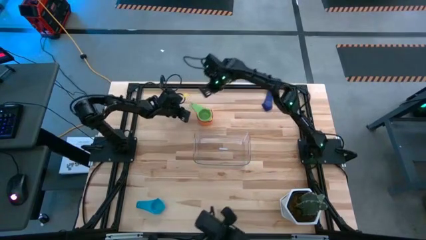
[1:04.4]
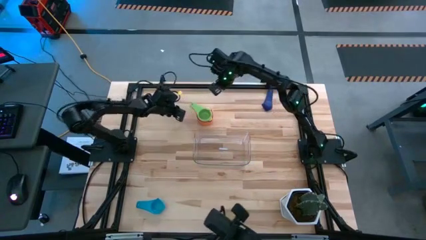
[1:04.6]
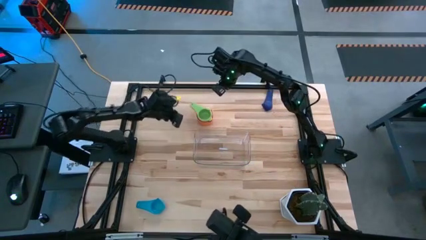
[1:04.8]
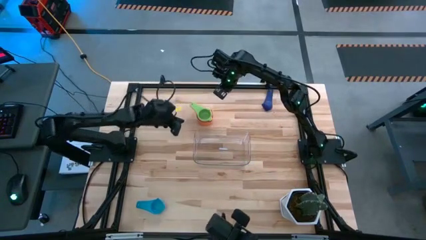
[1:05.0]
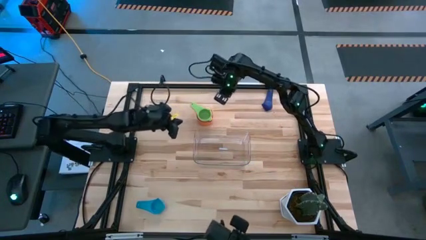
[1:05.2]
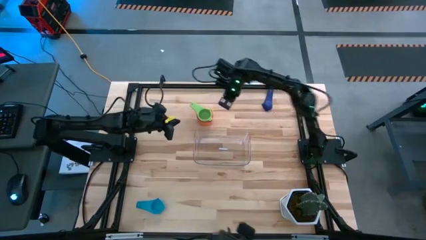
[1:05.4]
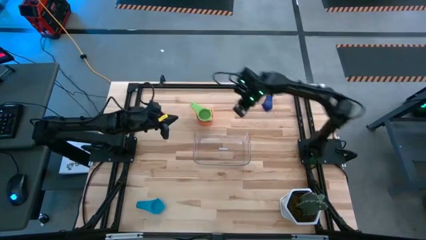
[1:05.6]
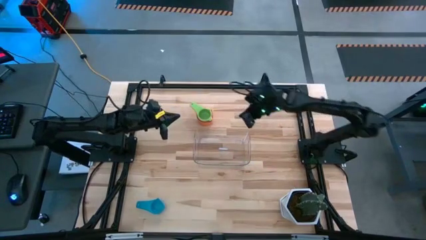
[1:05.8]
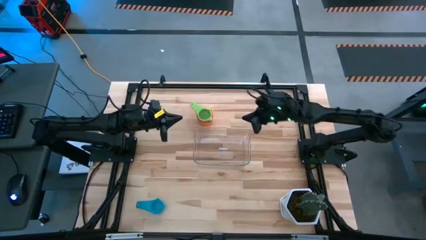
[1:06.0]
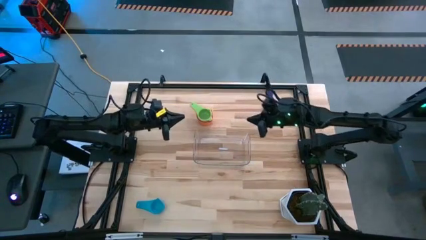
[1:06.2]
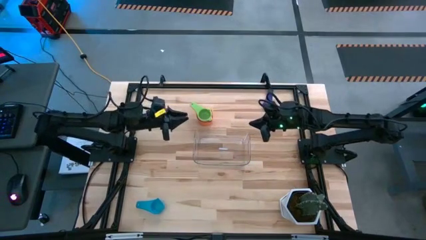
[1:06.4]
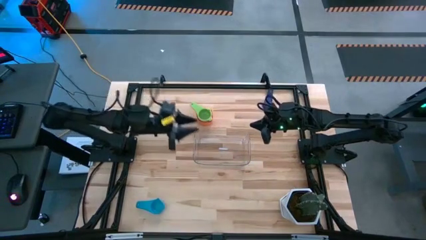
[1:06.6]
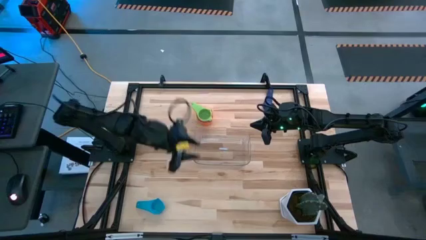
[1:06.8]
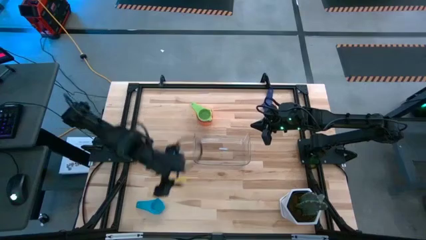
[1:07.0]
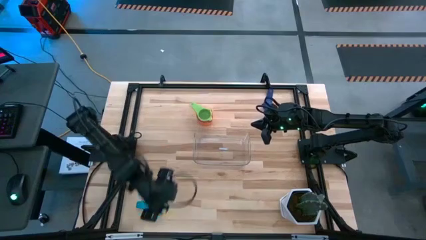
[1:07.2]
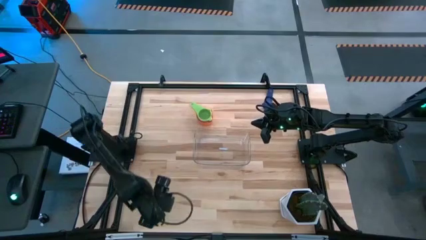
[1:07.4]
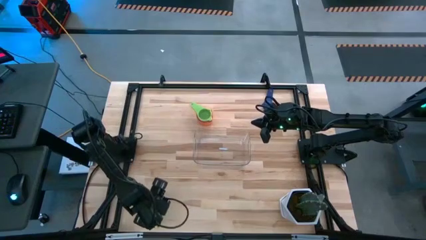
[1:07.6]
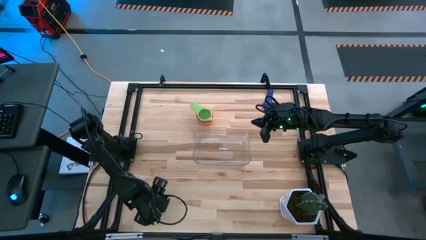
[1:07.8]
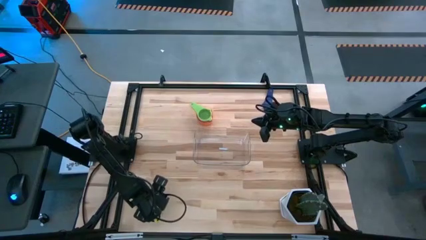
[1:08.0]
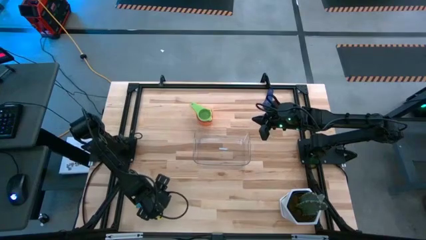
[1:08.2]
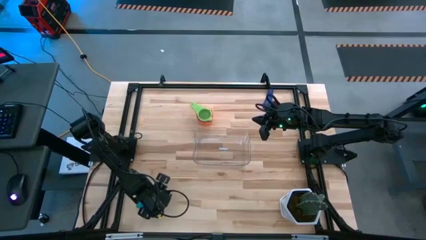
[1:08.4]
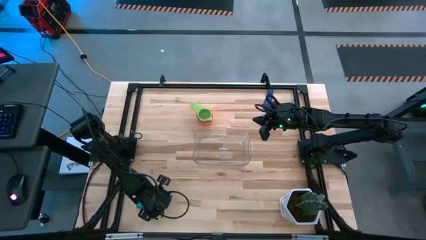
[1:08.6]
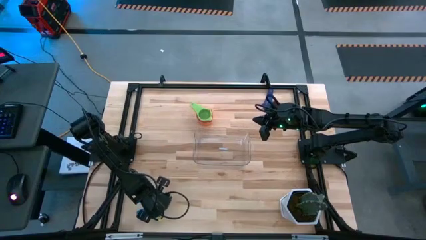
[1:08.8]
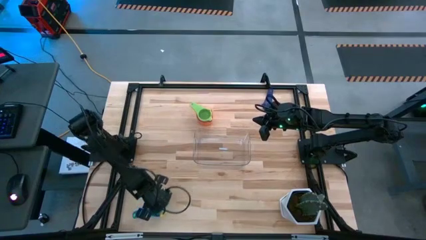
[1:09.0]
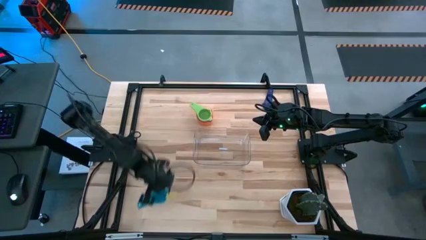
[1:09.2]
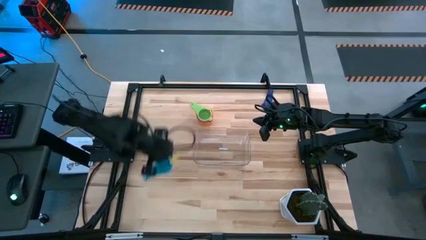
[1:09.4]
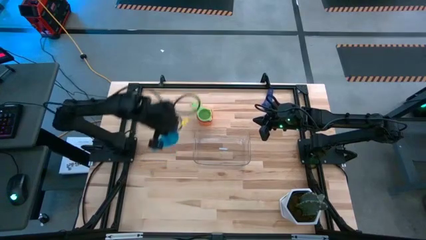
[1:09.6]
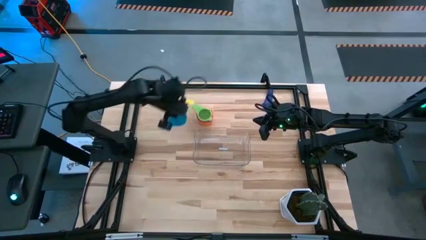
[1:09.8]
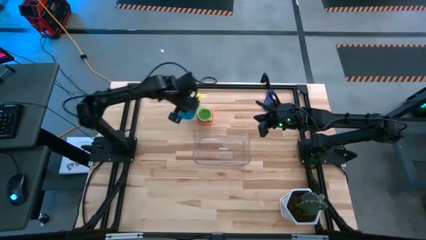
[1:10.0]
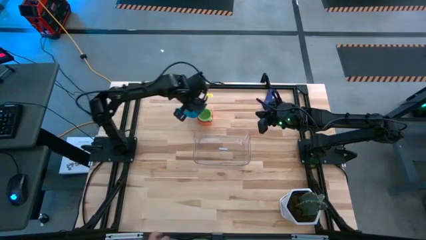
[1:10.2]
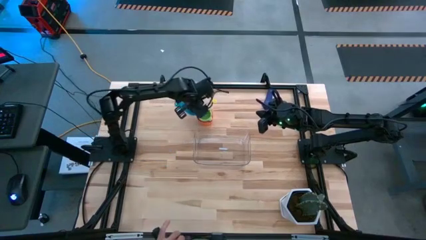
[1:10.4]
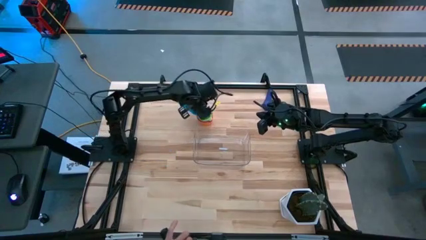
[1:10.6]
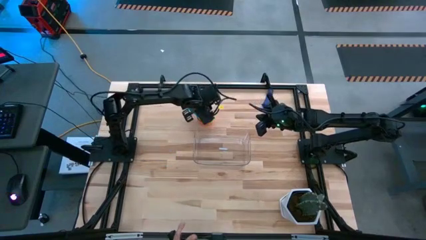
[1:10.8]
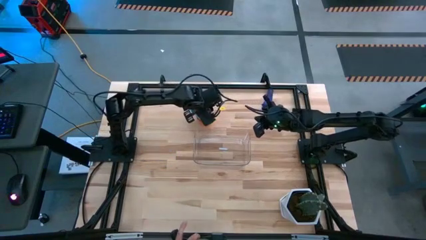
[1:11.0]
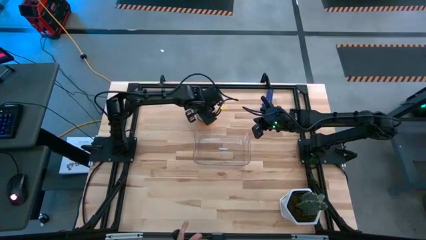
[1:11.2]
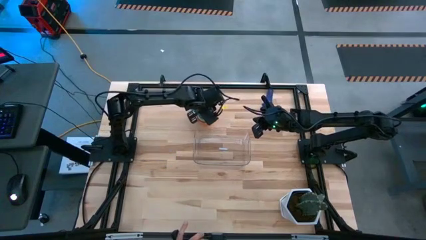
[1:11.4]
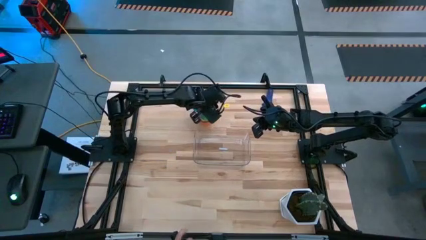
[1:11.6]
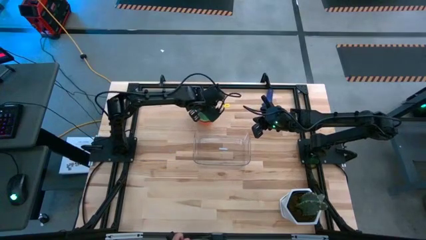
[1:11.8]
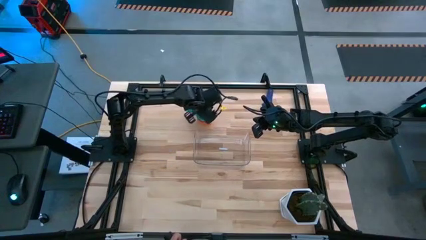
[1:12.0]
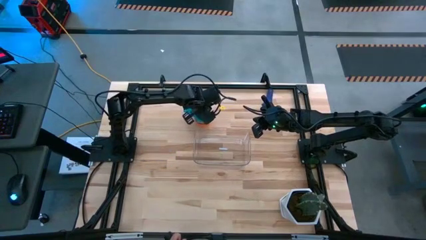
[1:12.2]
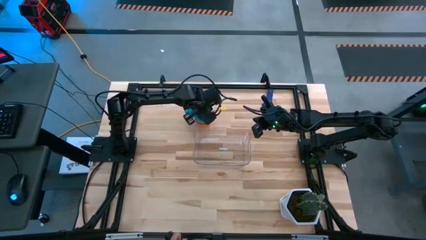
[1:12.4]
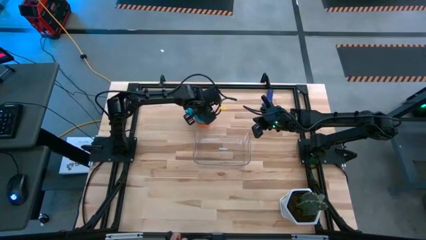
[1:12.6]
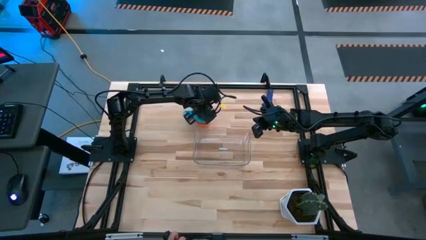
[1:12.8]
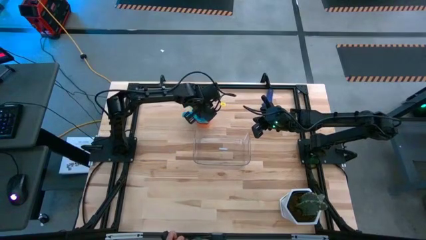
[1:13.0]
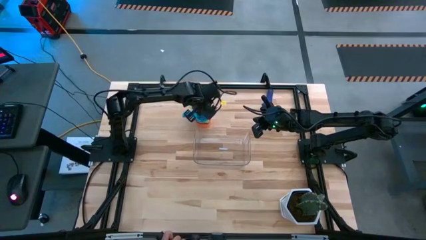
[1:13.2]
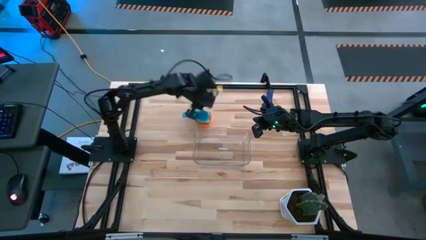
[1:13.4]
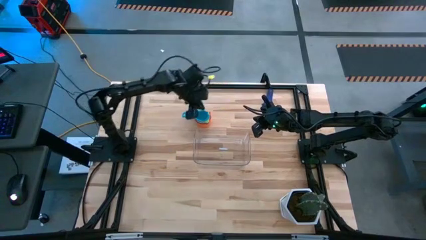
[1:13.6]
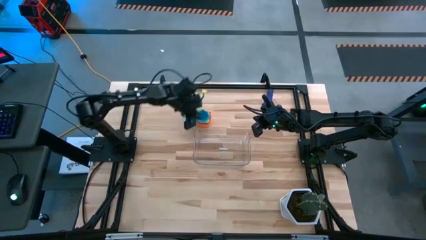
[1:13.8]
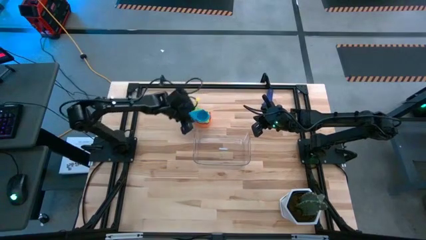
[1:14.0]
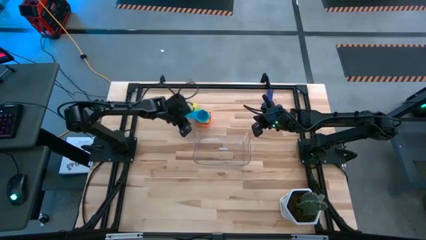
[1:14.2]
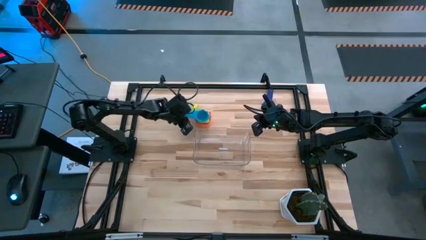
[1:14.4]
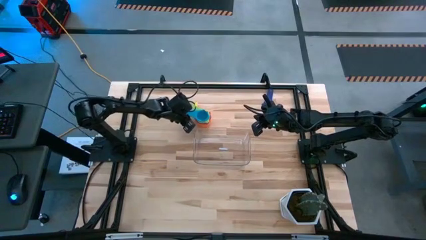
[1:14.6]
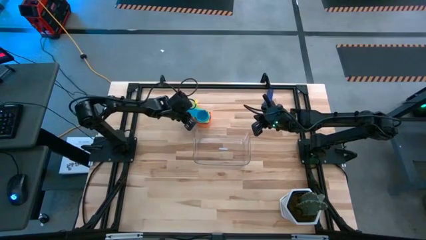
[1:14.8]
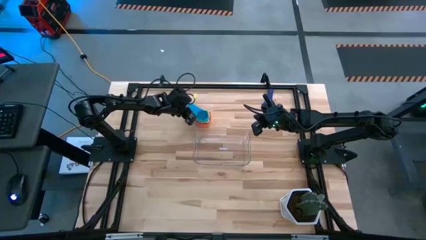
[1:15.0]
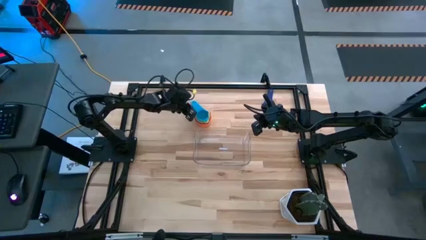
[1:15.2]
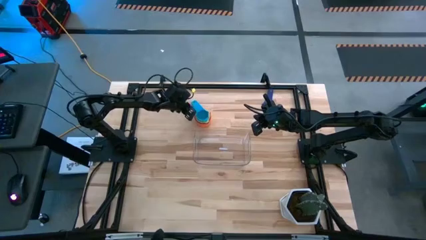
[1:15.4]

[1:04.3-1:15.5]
Task: Nest measuring cups in basket
Stack the light blue measuring cup on top of the green measuring cup

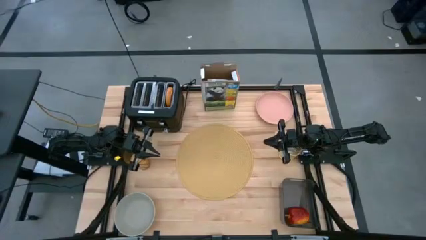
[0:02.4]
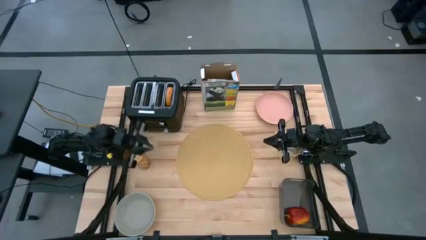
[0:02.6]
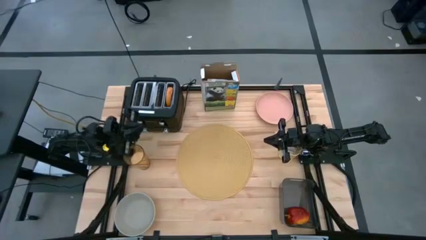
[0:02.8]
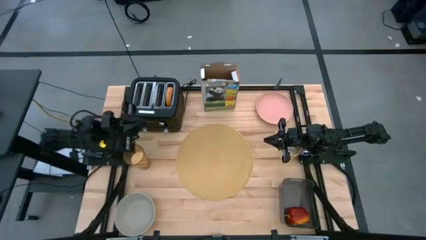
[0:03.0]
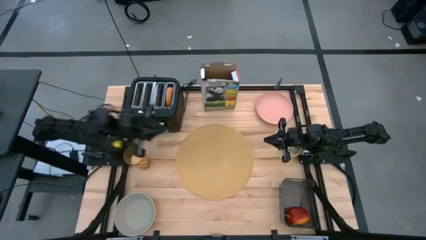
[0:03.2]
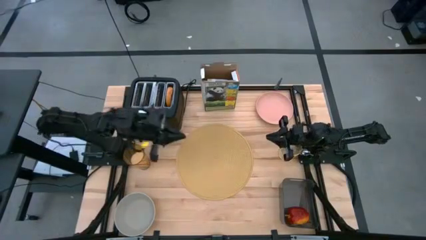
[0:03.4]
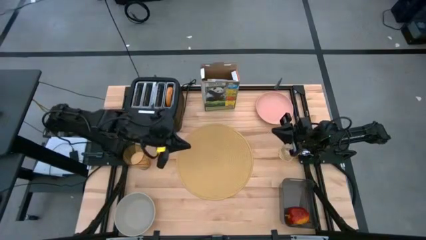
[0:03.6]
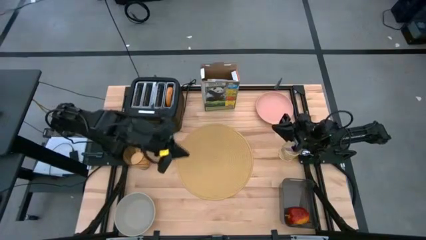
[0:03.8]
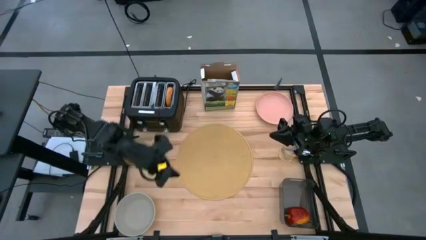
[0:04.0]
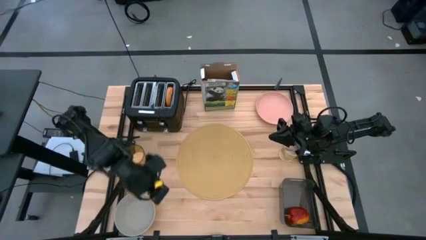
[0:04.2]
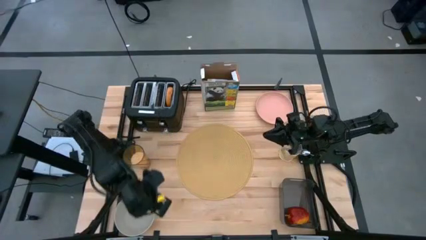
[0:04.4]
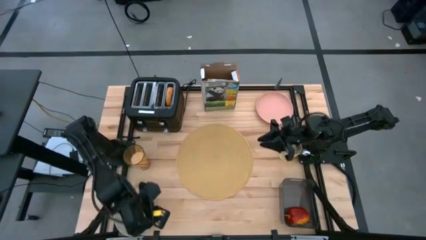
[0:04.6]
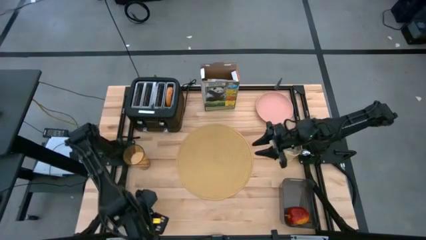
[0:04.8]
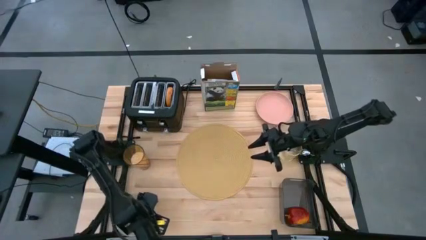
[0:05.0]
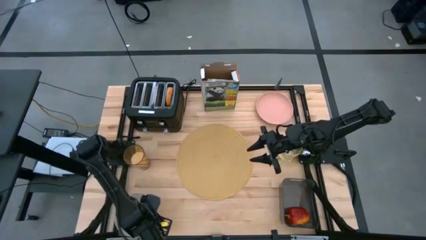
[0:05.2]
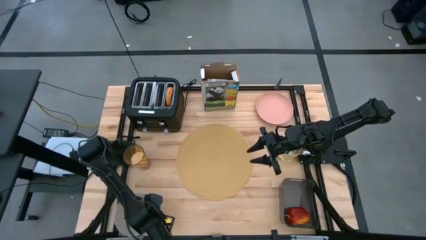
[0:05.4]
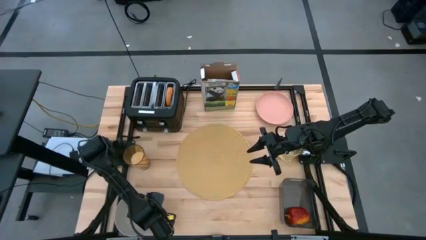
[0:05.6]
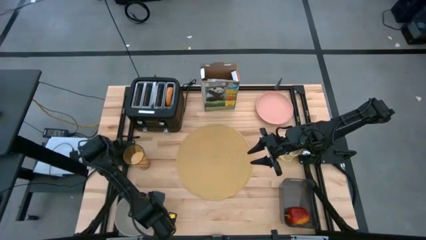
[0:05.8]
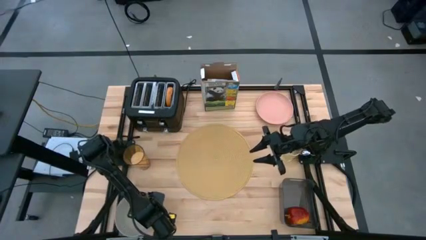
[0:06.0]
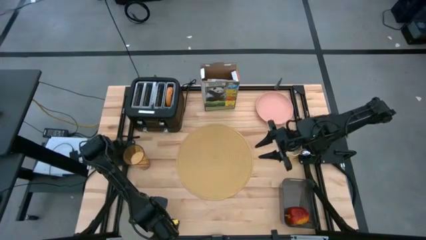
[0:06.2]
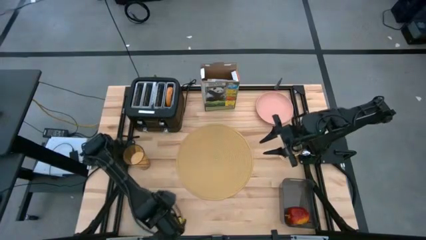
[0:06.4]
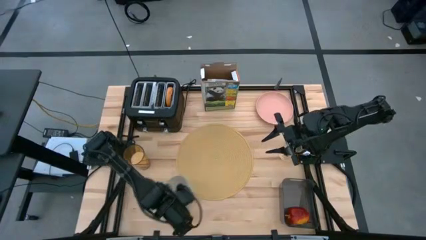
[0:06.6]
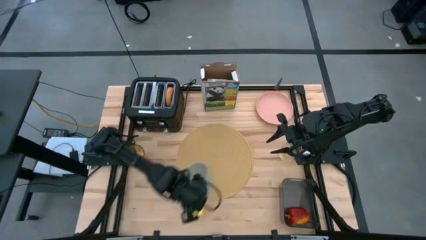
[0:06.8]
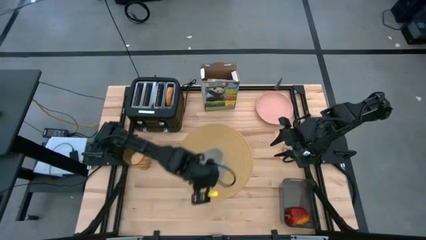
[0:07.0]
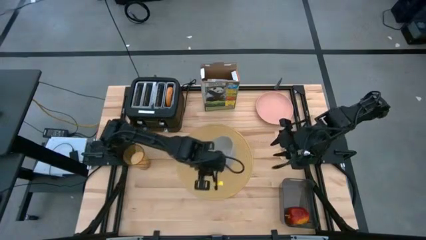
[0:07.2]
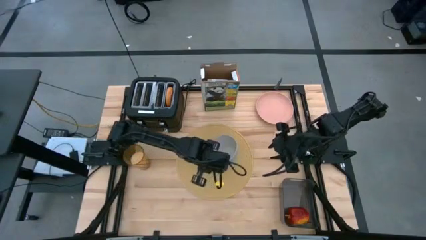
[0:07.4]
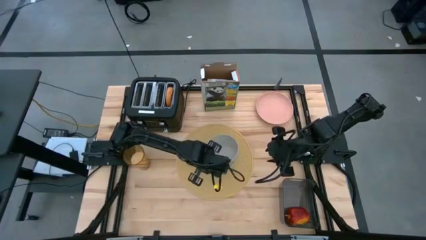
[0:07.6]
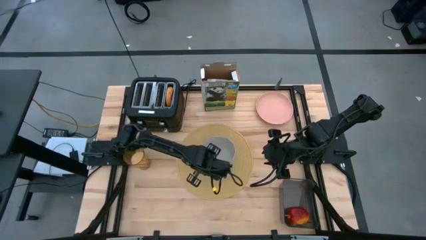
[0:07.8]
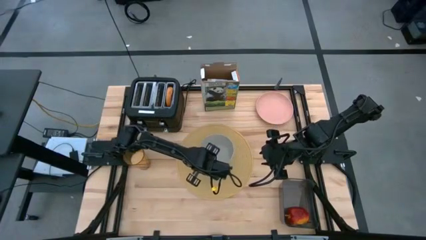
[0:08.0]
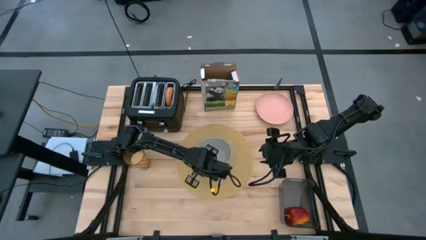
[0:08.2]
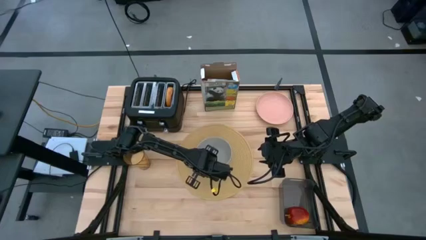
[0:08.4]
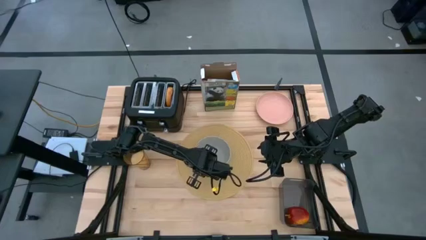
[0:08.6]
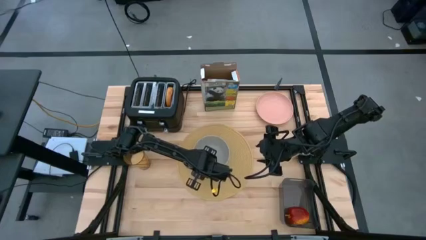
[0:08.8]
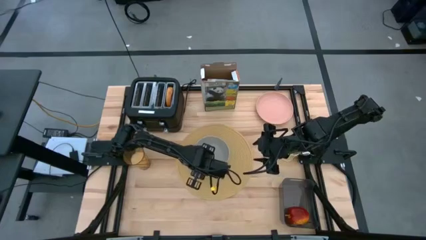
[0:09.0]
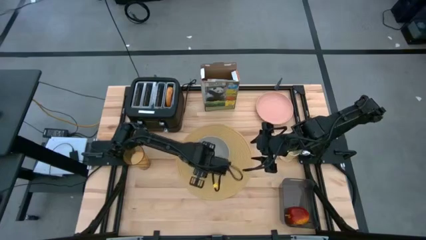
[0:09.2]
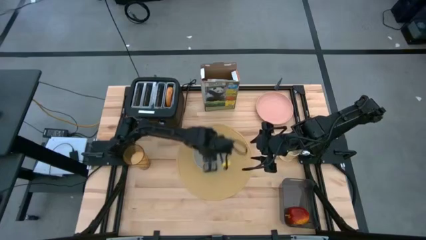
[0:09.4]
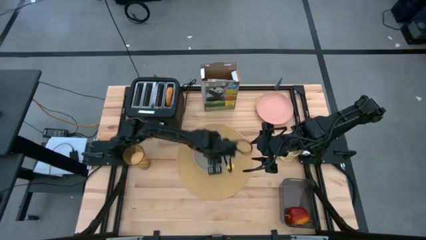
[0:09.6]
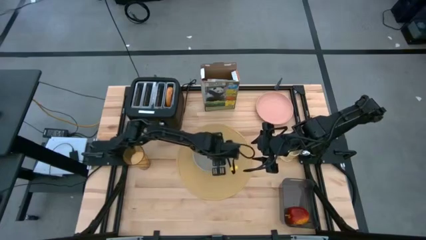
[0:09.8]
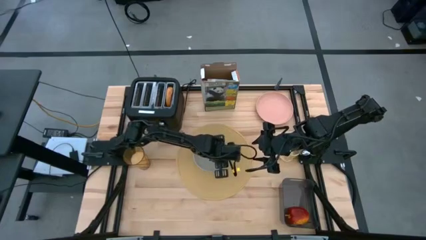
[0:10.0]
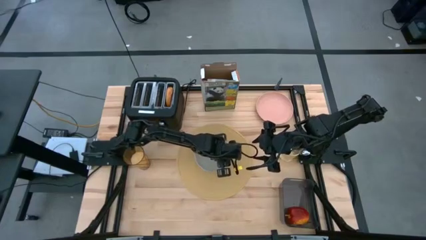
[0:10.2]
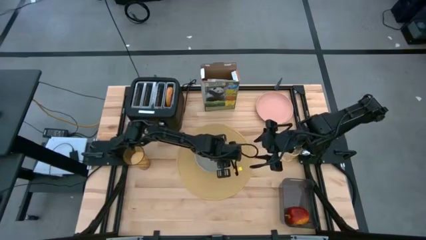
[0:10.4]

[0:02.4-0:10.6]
Task: Arrange a breakfast setting
Put the gray bowl on the placemat
